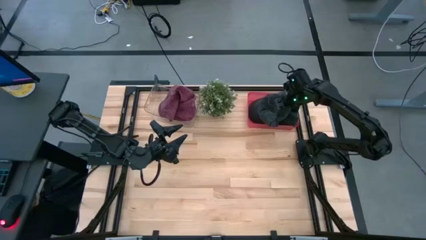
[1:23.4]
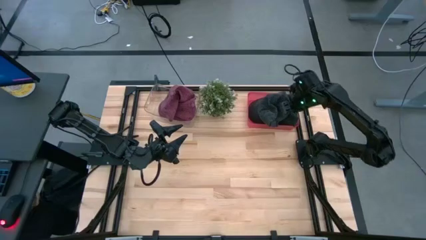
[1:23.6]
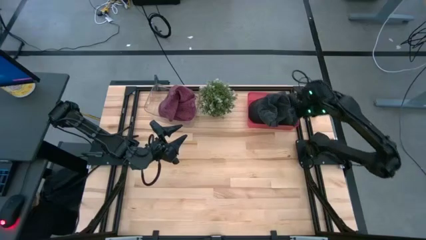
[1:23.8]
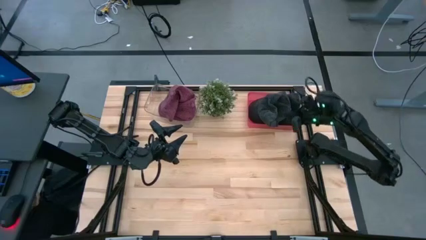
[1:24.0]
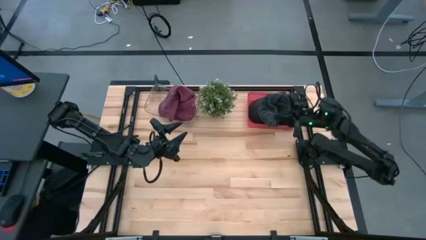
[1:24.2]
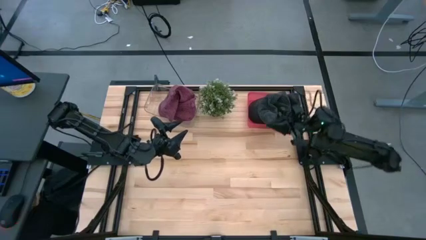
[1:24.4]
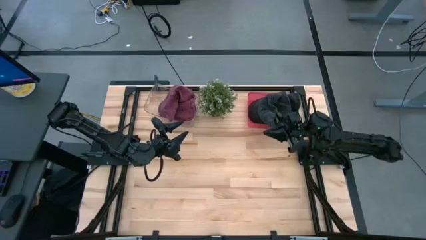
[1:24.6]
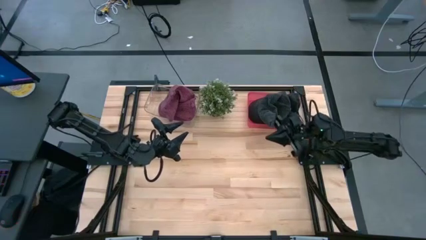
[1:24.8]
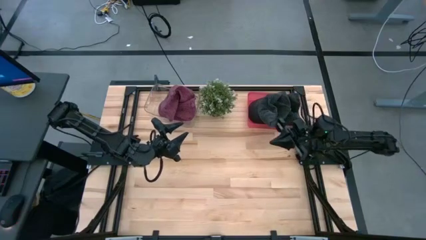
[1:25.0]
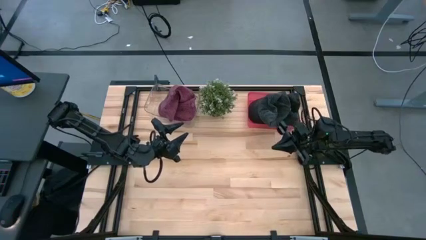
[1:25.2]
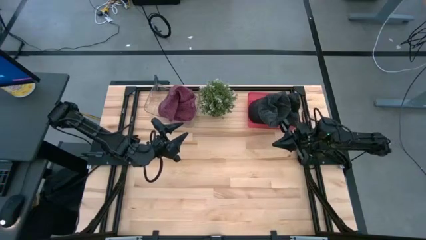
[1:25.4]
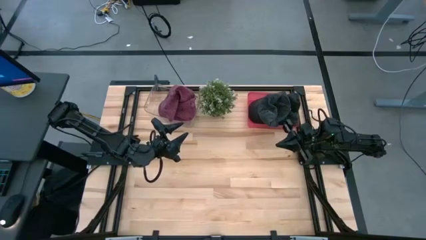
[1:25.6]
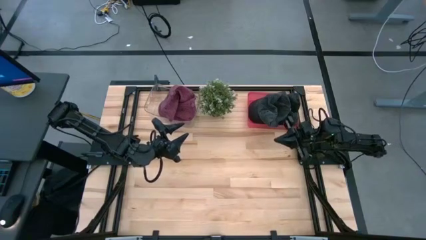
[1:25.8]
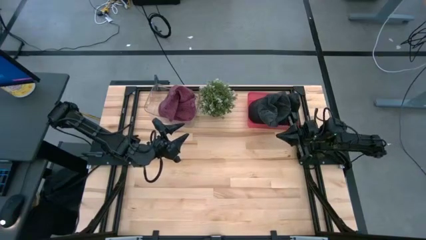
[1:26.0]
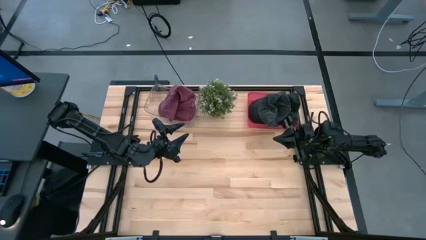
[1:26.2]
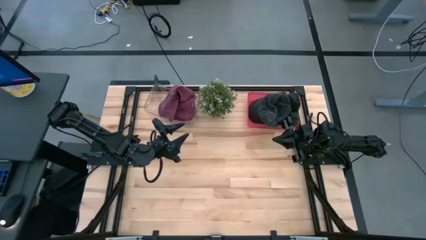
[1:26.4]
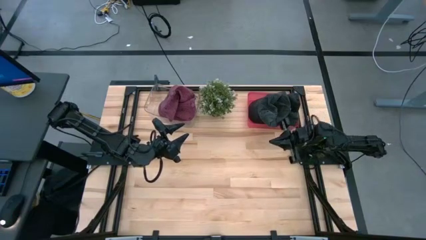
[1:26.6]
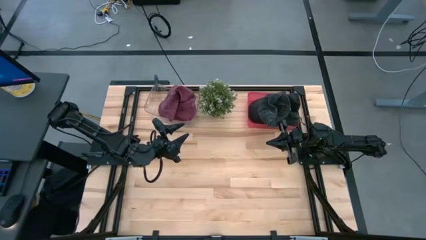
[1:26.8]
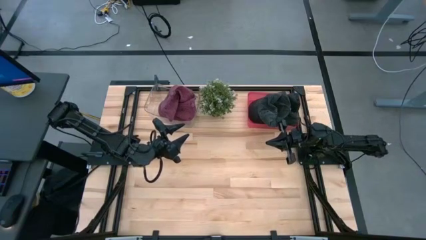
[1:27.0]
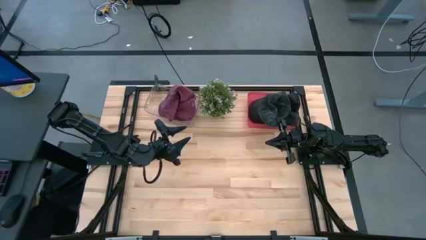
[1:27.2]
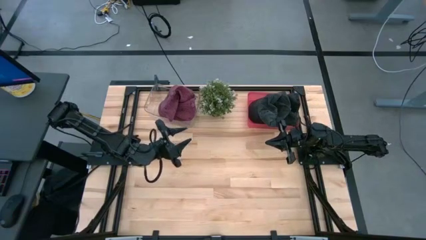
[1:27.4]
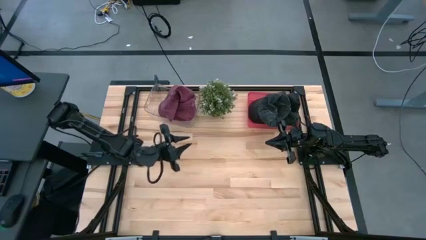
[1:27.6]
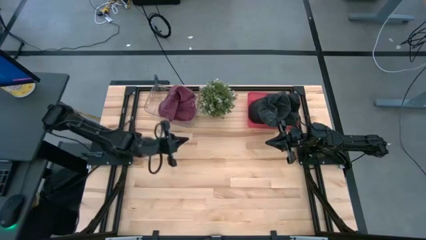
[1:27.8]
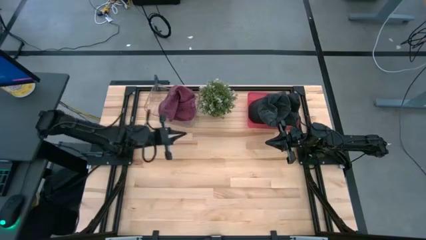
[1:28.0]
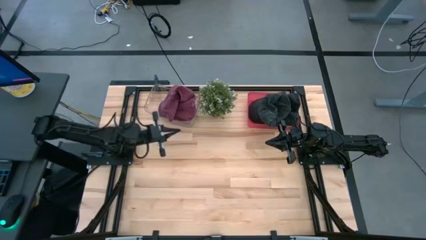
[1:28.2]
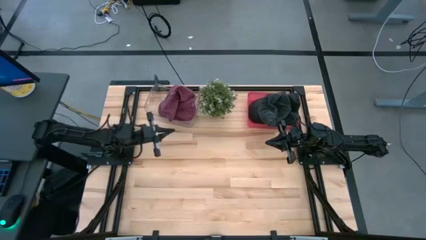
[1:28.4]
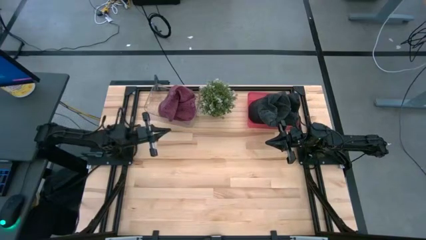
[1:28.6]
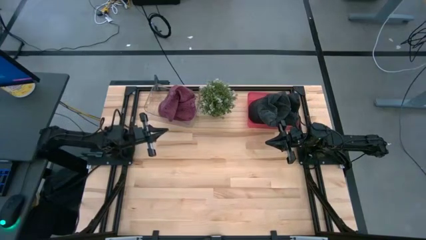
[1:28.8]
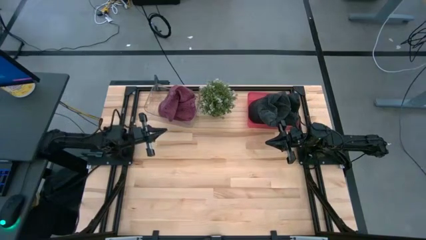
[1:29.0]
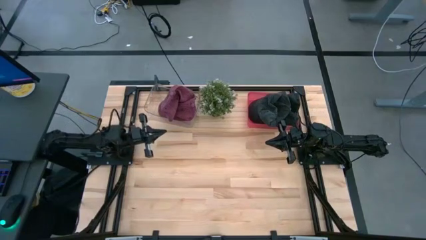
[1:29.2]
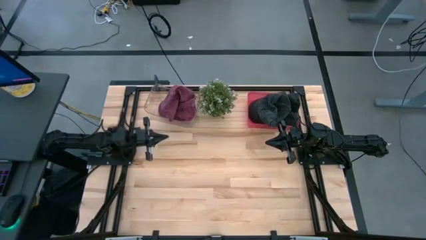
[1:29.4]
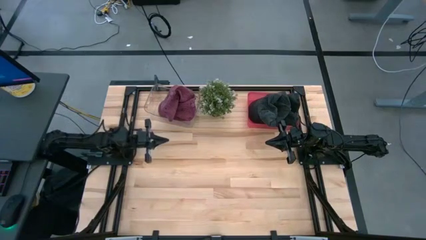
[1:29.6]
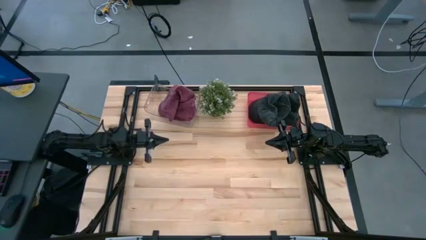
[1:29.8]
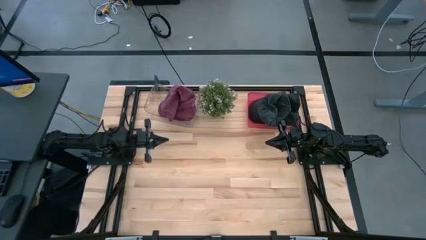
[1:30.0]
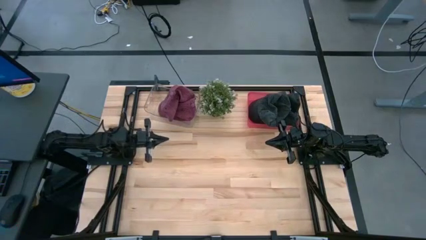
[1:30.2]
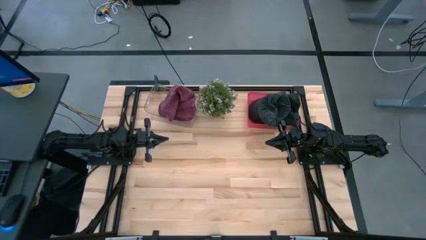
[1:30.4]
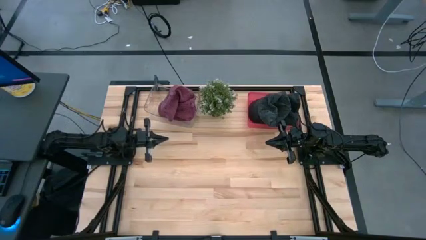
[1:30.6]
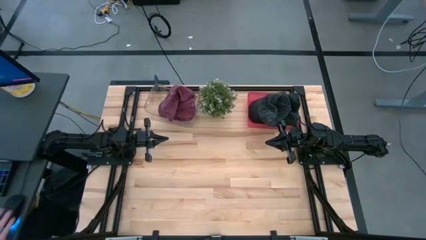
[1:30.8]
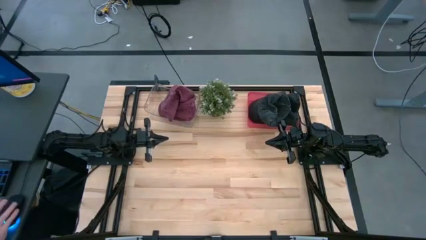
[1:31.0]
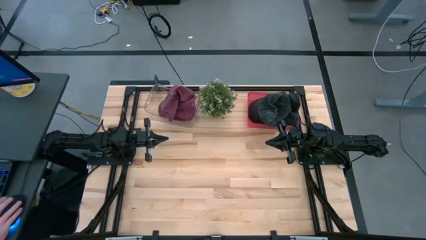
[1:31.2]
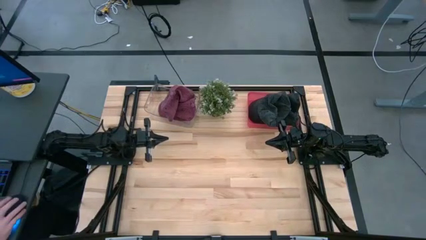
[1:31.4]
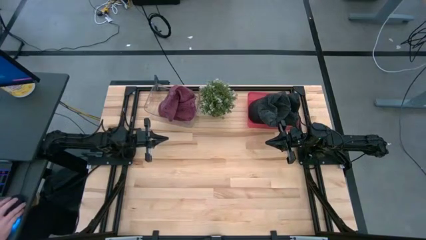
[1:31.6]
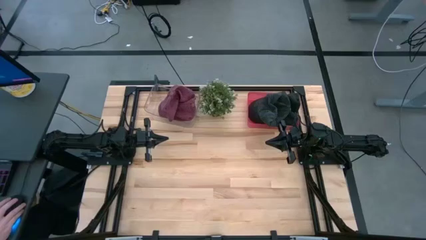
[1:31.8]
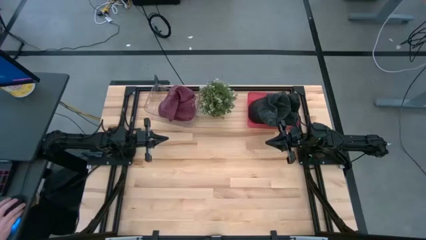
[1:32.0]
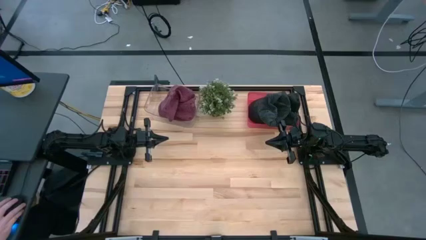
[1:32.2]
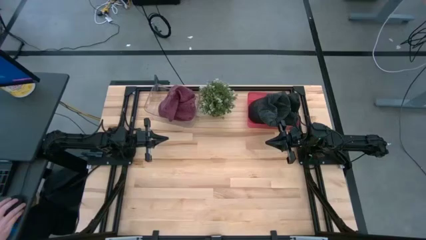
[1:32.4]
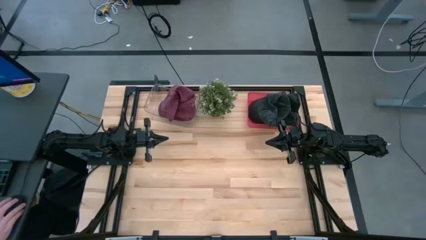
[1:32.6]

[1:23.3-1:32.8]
Task: Pick & Place hat
Return to Home Position

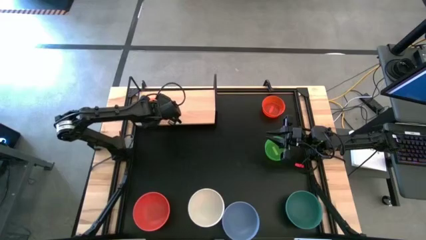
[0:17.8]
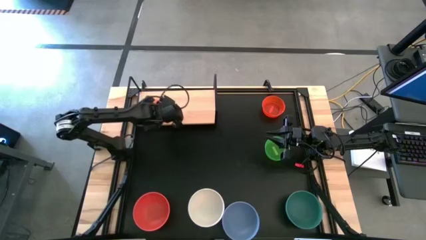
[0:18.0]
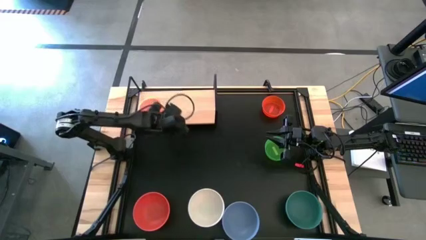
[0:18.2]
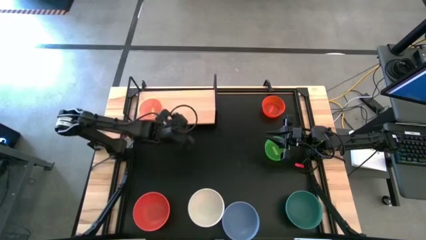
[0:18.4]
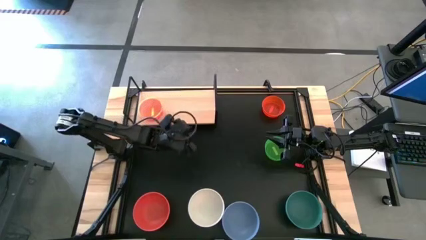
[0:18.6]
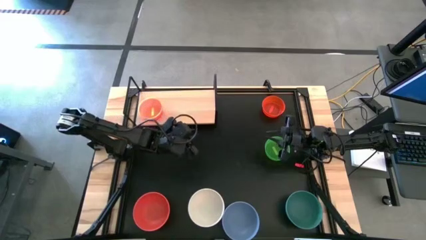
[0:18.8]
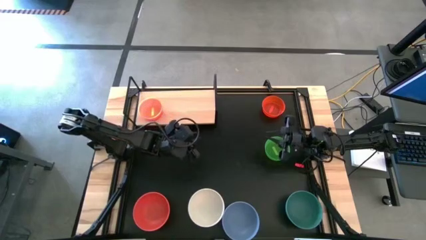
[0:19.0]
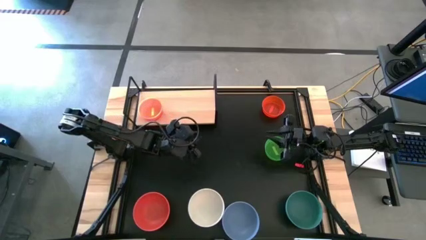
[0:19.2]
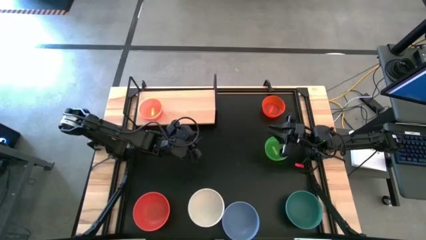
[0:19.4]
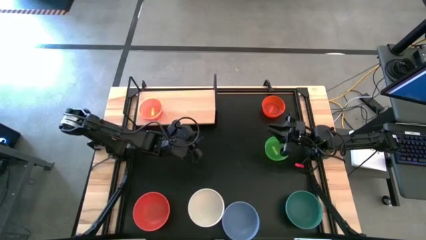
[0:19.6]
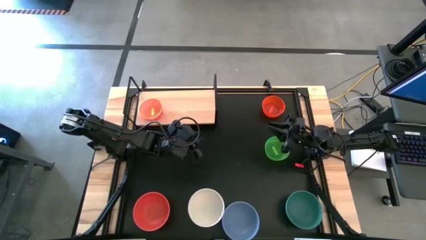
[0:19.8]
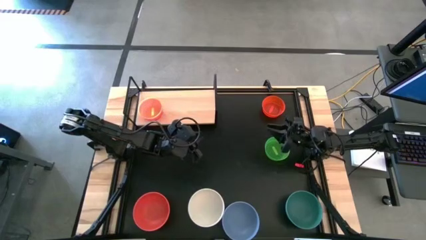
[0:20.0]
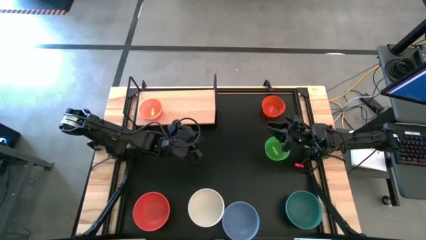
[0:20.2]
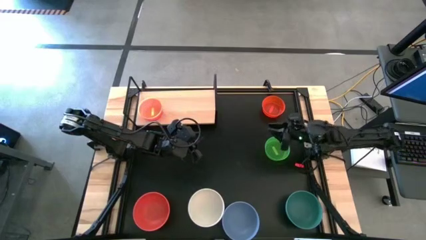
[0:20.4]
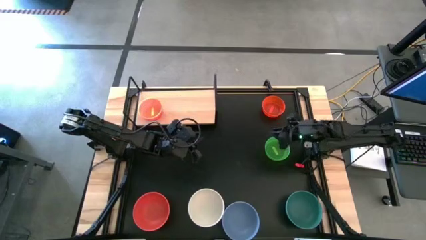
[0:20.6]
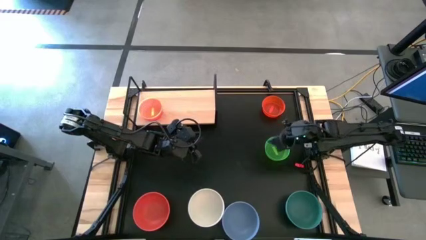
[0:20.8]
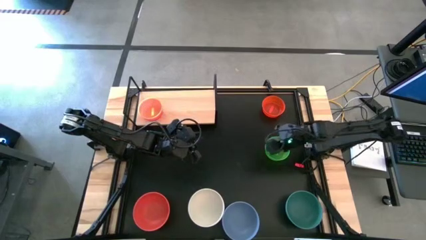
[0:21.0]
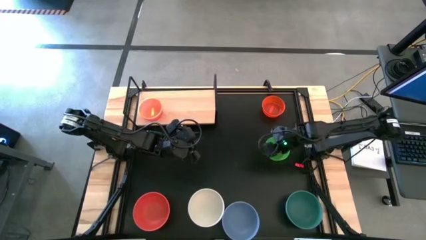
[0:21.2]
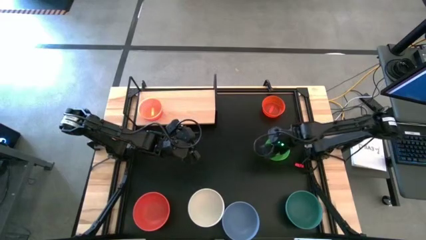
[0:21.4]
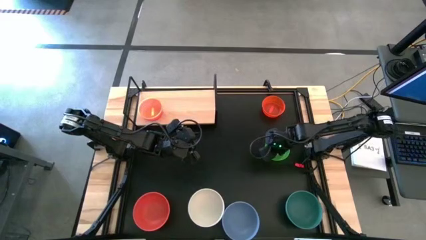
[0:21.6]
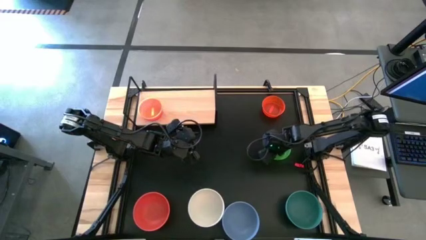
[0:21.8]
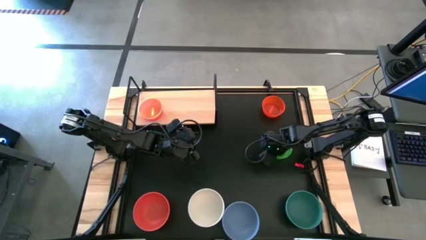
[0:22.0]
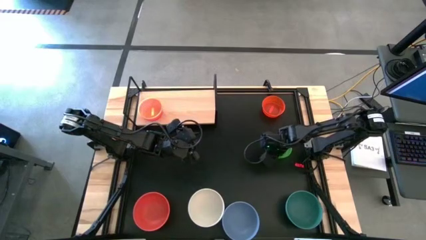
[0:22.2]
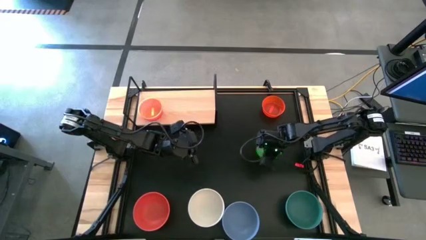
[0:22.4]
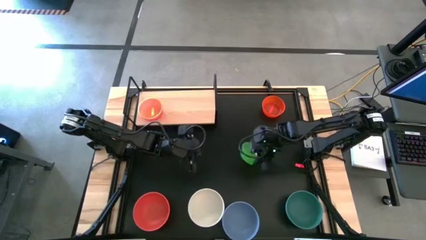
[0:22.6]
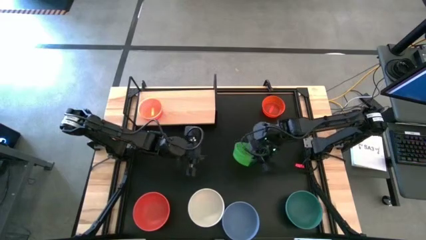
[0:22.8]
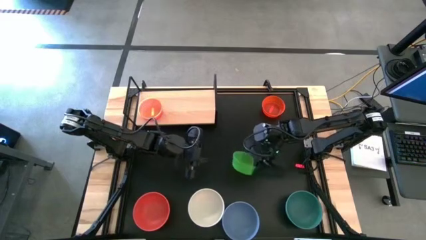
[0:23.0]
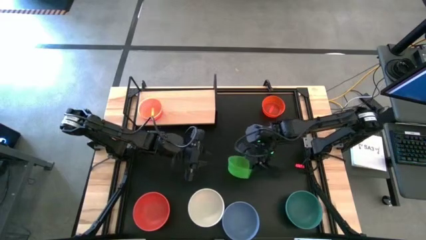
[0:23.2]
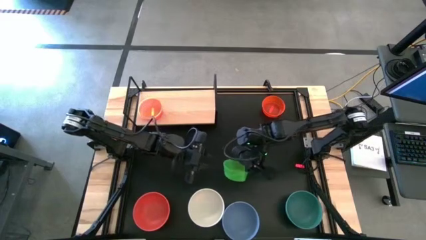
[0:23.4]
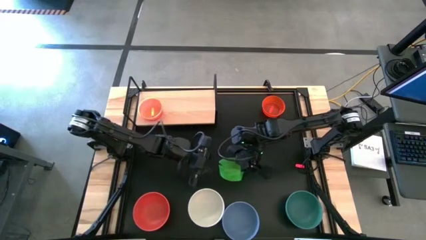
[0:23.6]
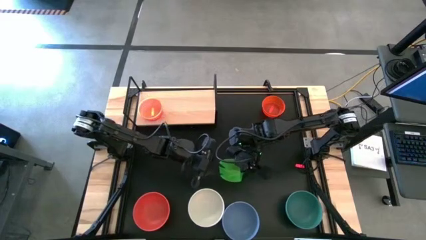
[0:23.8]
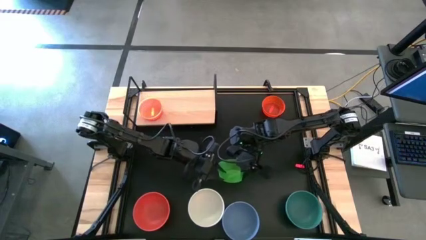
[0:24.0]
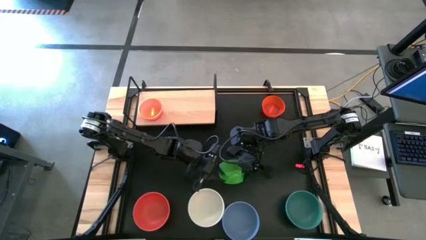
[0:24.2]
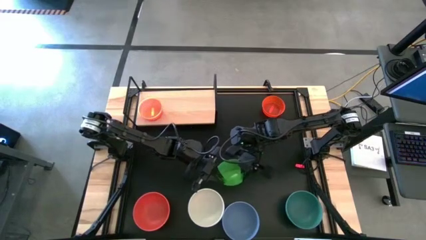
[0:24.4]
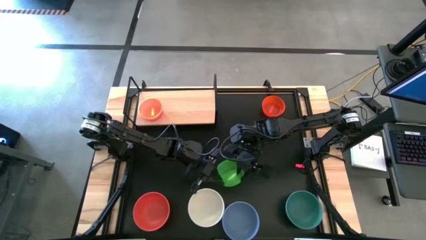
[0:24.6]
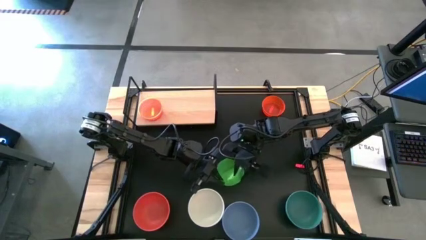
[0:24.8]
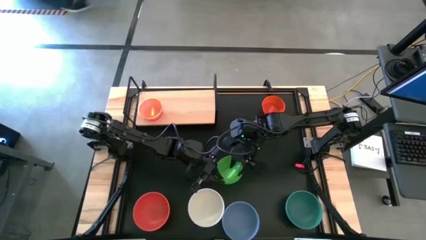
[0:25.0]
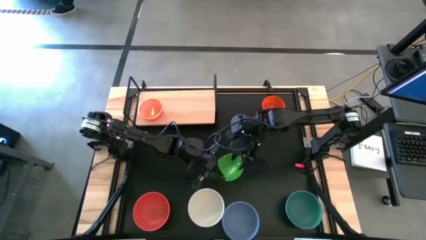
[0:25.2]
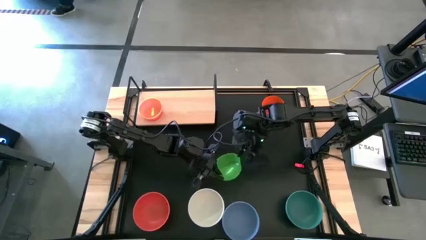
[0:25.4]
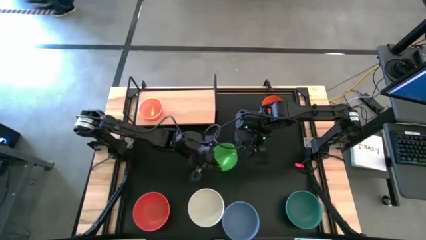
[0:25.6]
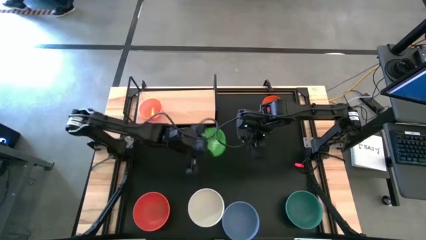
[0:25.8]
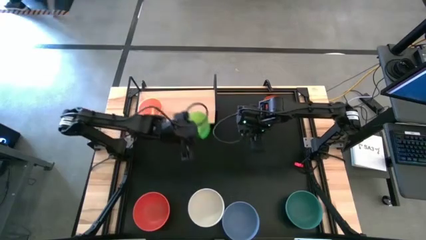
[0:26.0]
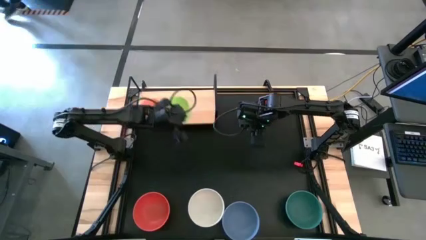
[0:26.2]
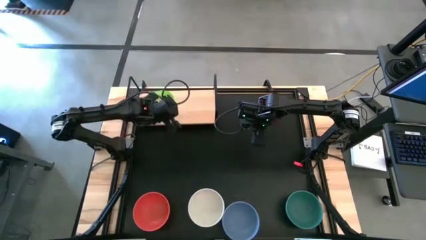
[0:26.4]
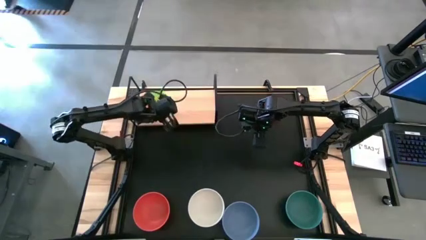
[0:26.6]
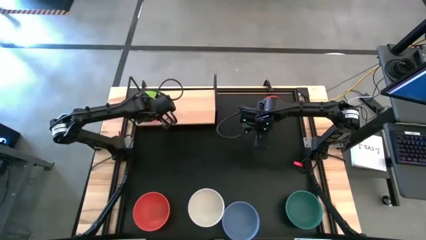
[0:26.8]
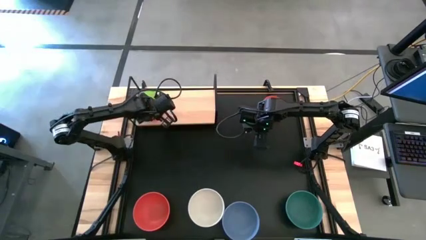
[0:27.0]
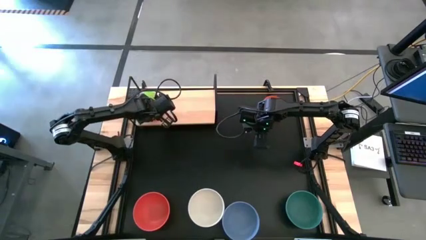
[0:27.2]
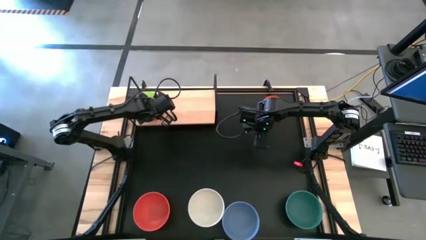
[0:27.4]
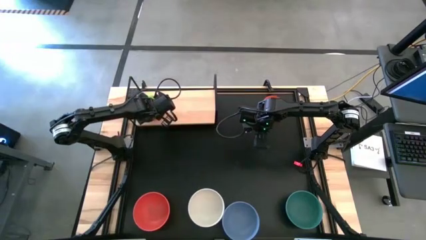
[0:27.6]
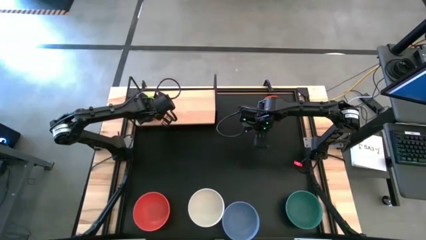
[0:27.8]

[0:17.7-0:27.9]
Task: Place and stack bowls onto a shelf
Stack the green bowl on top of the yellow bowl on the shelf
